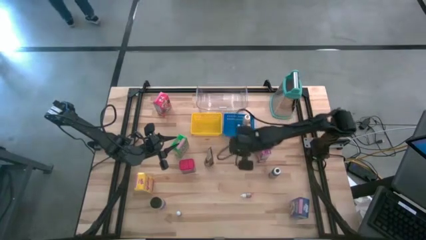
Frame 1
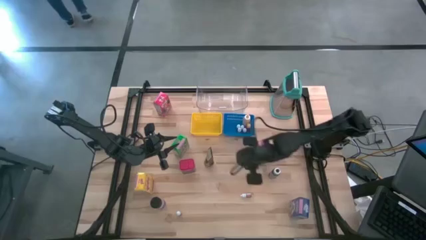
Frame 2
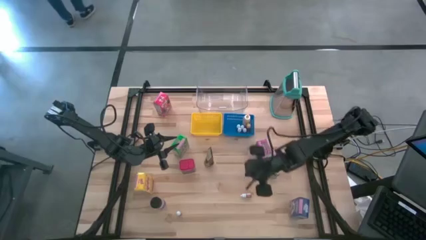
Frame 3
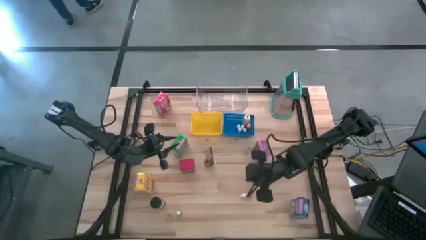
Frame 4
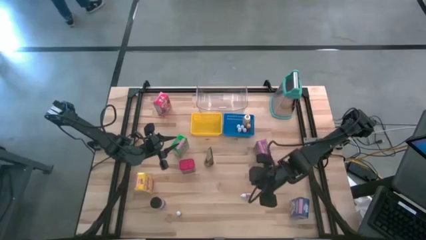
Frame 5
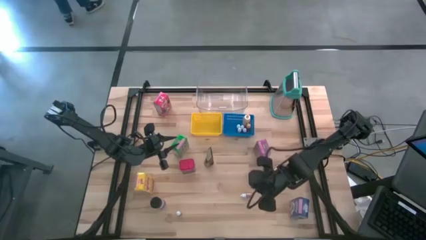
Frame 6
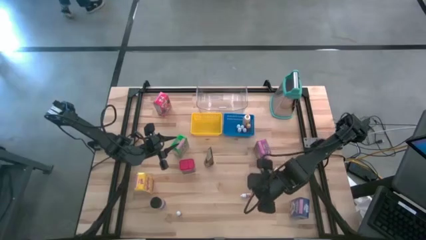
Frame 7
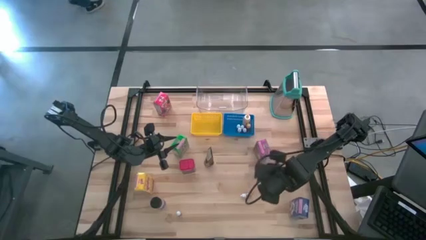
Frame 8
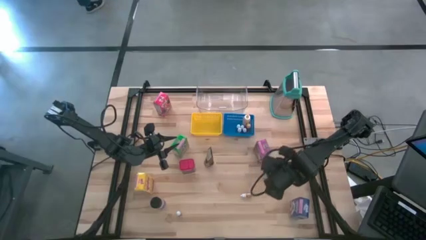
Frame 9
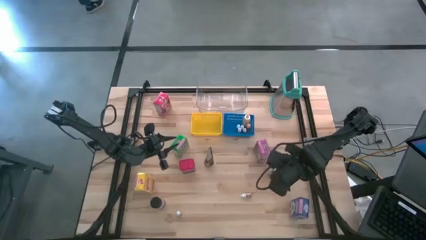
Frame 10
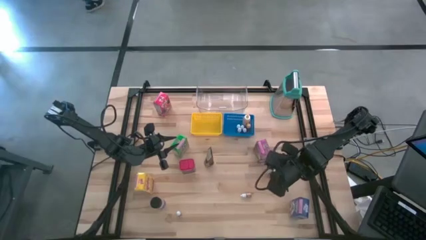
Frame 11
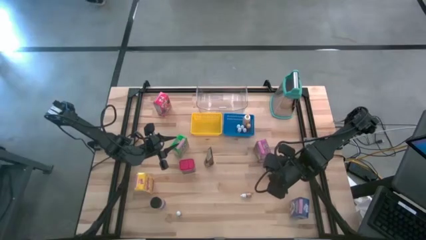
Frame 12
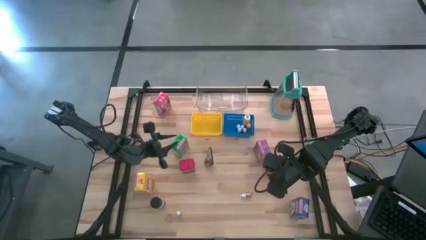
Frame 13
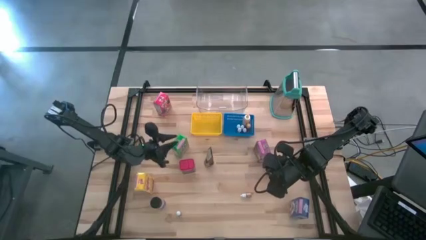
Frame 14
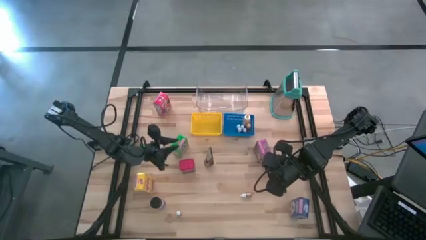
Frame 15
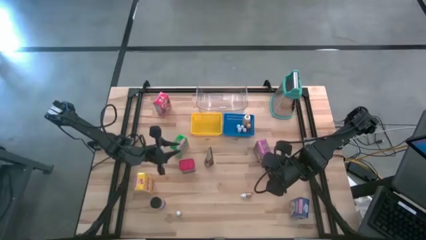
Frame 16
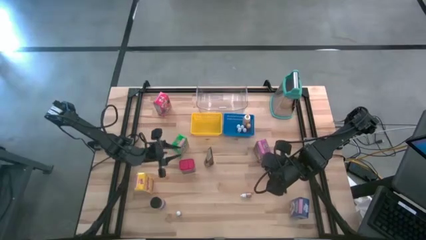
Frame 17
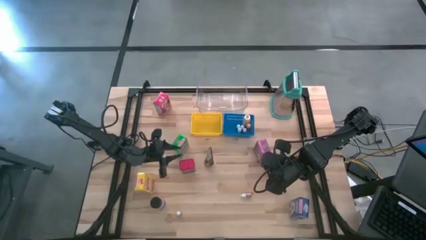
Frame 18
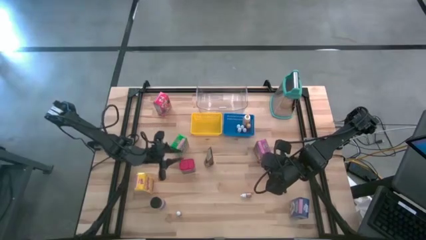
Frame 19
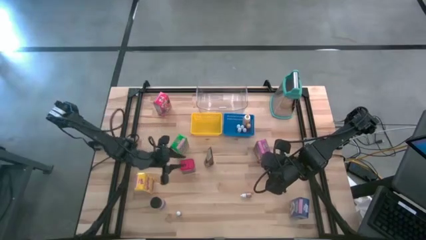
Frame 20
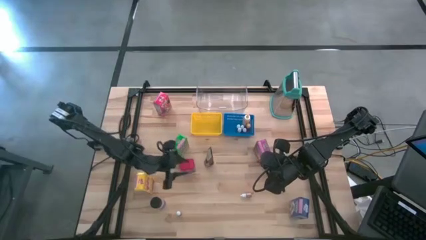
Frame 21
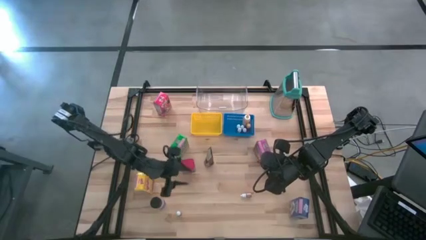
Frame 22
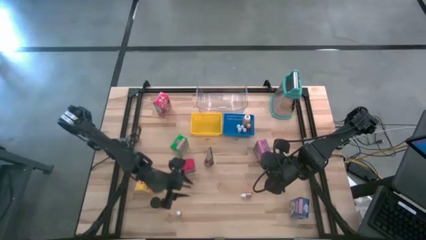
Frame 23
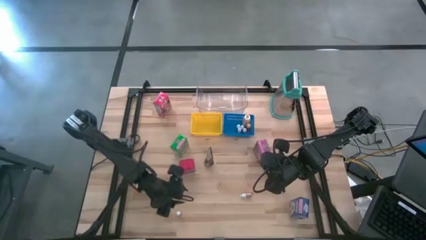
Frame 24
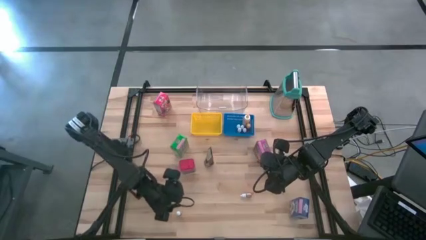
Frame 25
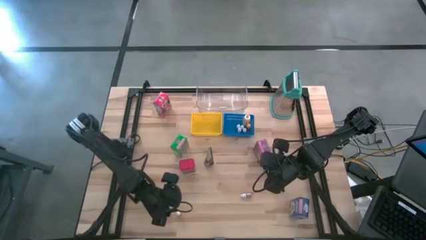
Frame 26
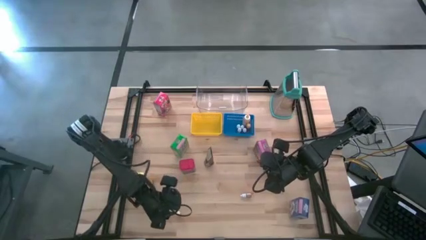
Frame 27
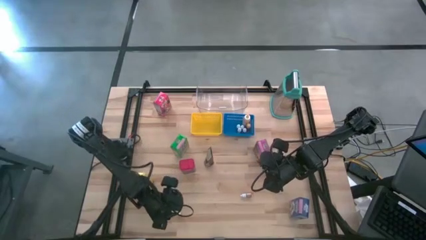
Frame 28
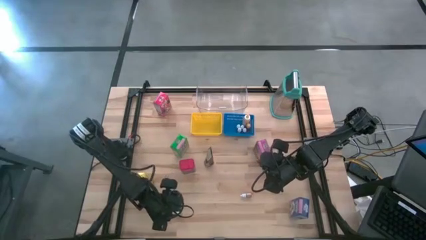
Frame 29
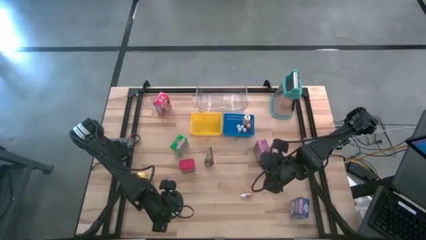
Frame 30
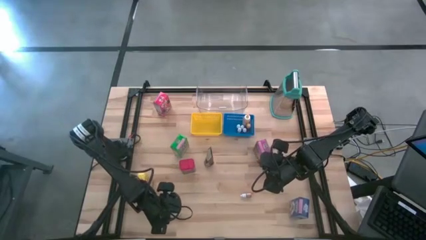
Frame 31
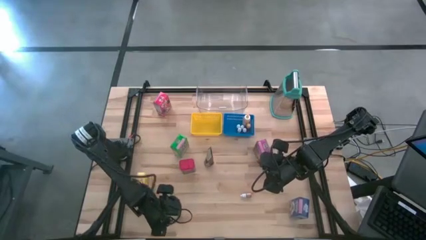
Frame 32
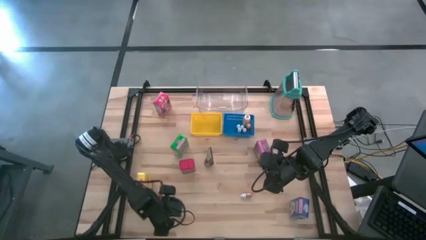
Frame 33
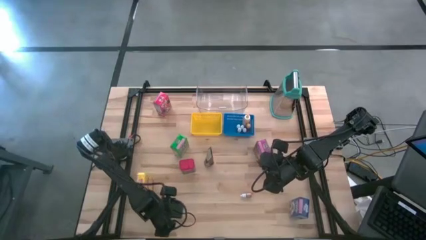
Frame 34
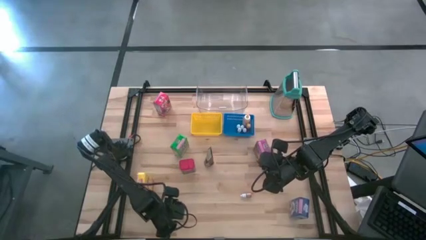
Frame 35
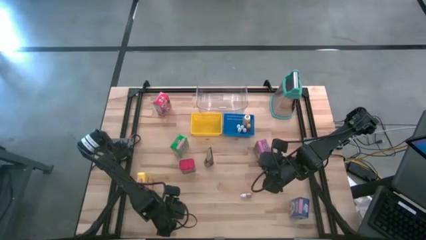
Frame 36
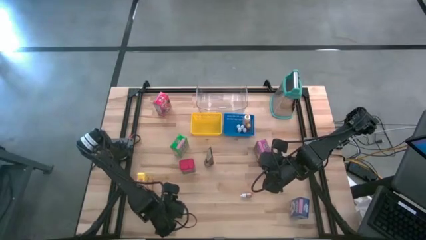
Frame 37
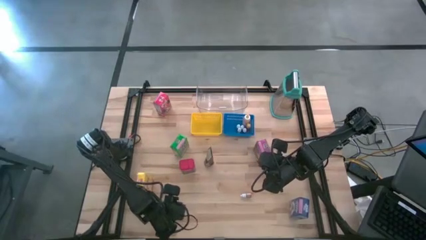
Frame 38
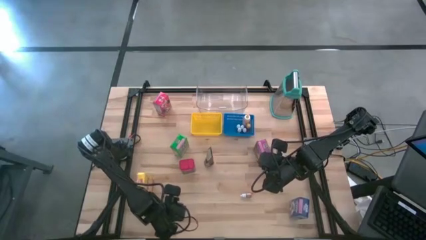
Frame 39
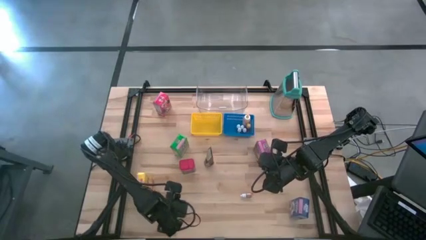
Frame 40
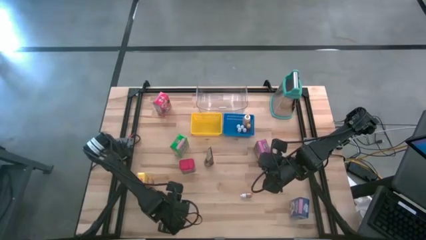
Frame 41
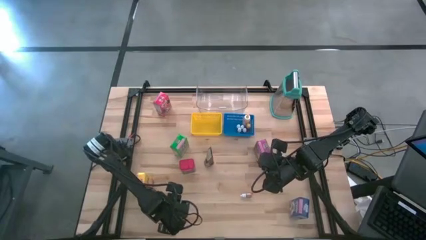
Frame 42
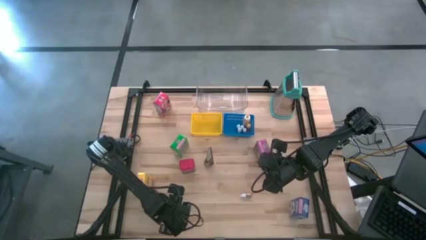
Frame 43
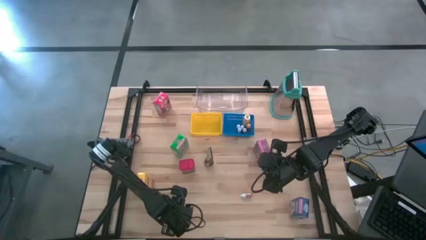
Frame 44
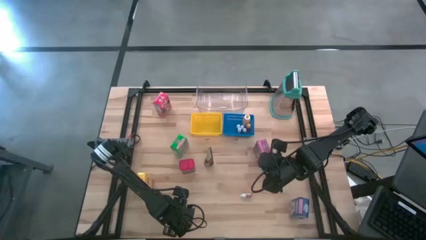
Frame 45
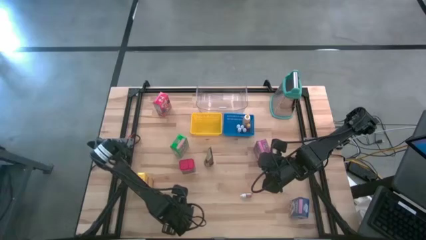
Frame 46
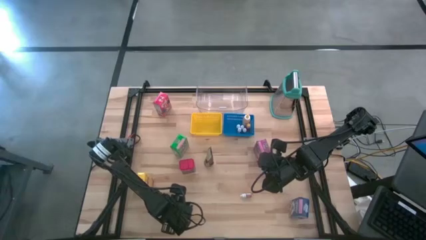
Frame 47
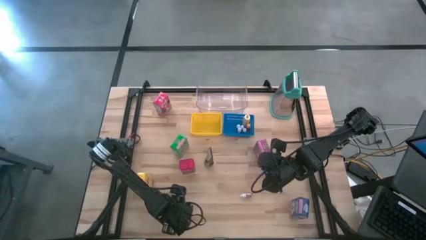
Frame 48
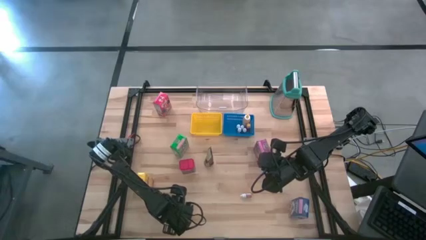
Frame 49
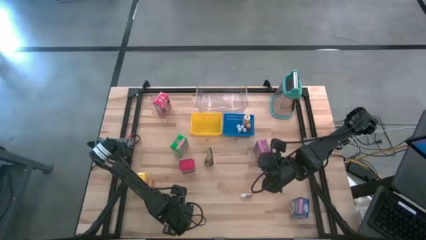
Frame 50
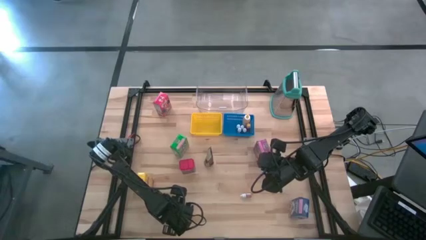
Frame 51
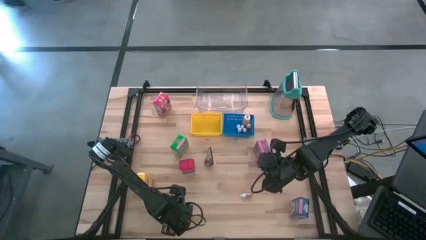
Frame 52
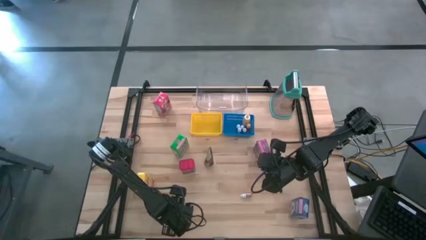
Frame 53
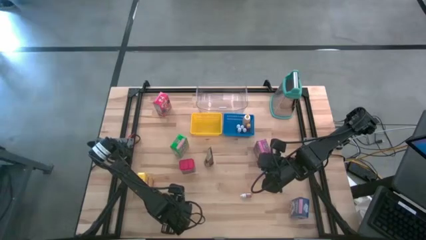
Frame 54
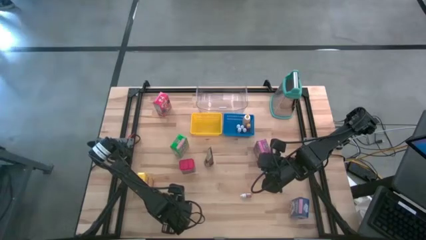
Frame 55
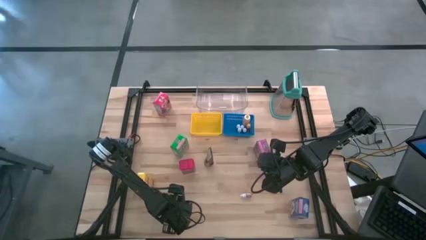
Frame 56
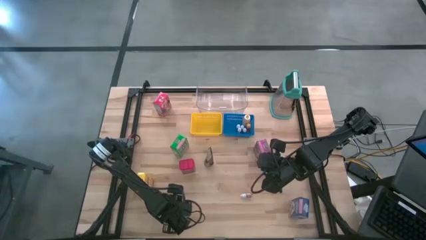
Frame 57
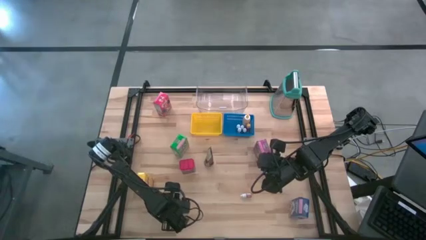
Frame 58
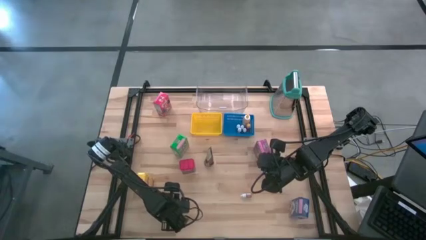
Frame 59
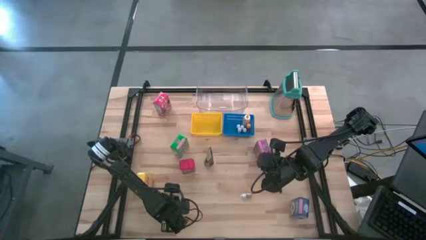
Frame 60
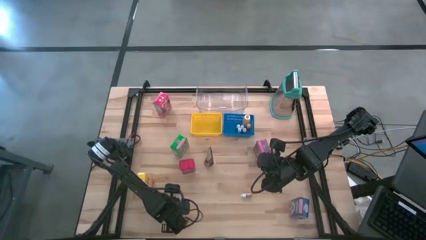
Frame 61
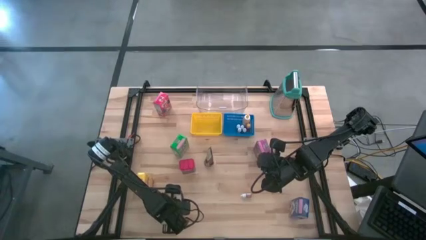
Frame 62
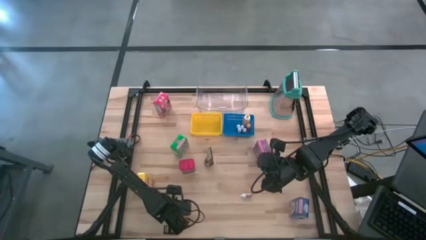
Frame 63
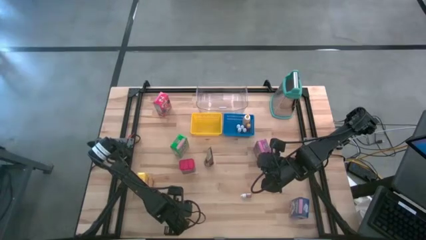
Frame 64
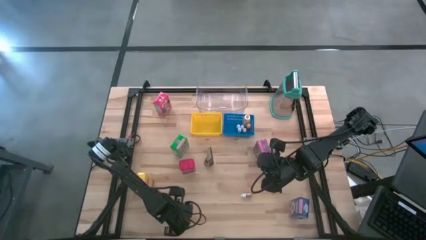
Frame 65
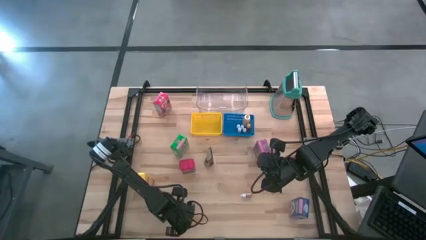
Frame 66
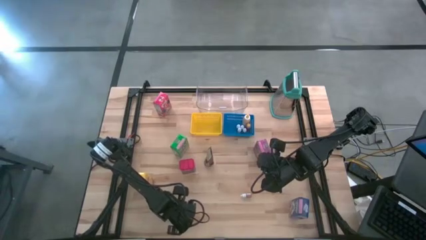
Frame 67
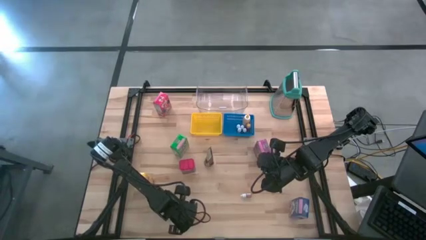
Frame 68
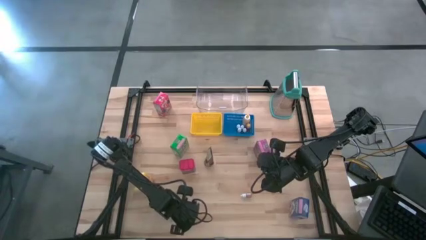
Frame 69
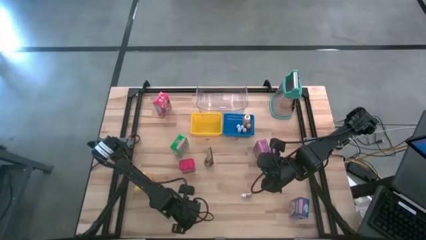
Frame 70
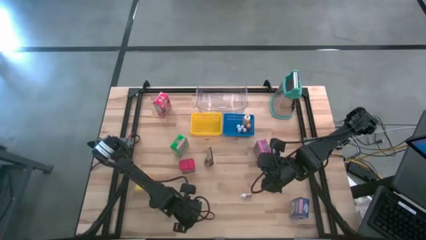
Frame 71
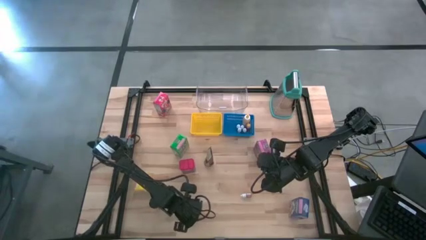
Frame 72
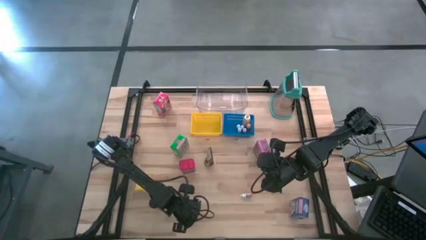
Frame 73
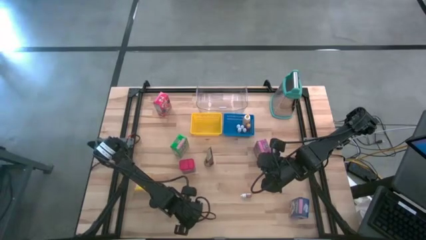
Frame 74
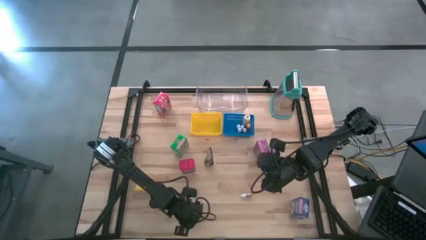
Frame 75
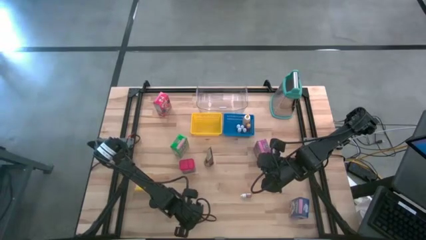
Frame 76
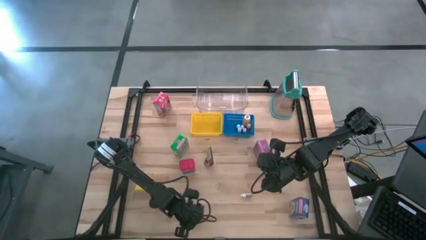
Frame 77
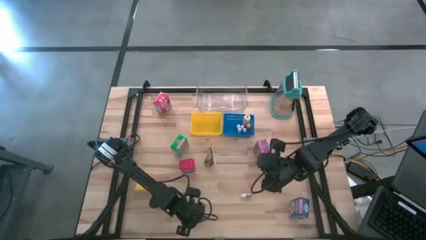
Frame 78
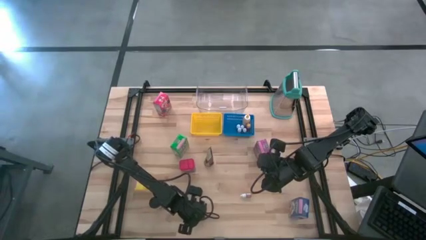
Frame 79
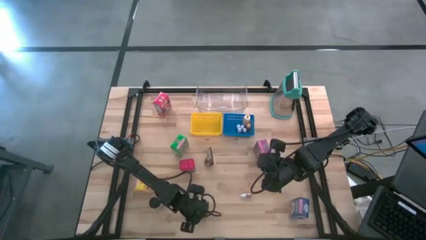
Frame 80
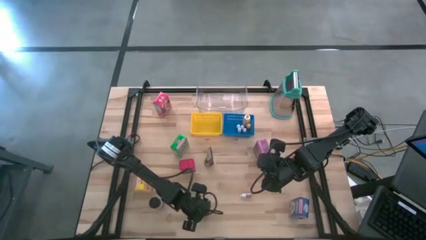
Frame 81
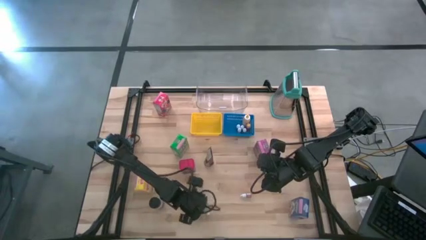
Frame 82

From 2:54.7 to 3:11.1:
Task: Pick & Place Kitchen Items
Put the purple food coloring bottle into the blue bin
